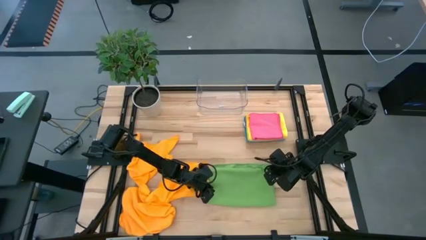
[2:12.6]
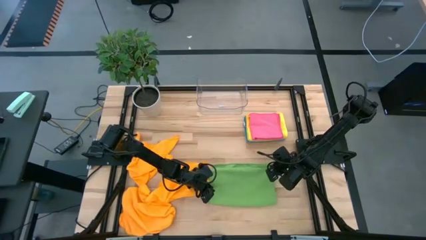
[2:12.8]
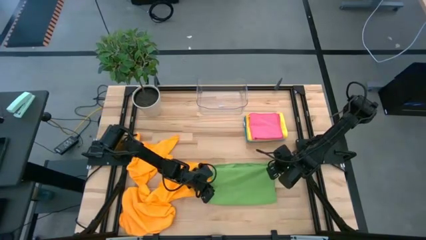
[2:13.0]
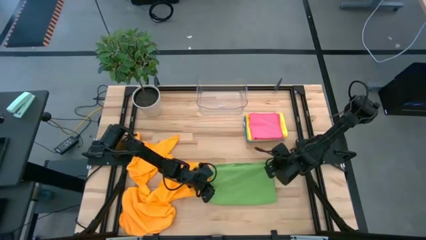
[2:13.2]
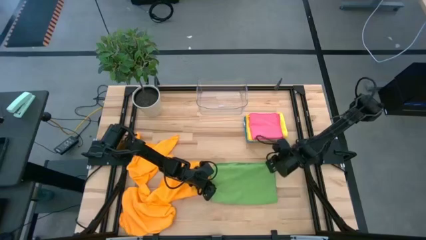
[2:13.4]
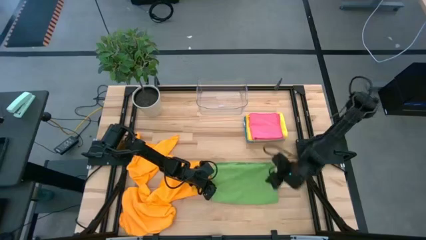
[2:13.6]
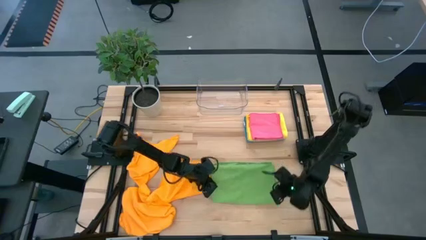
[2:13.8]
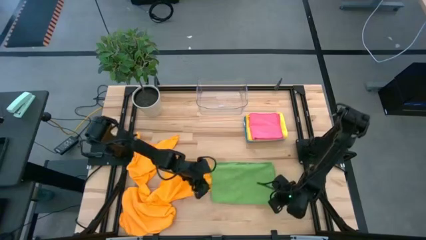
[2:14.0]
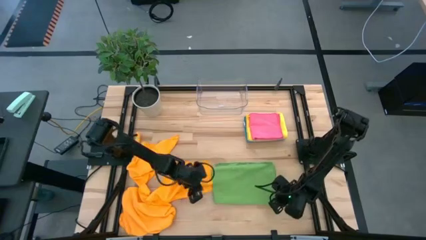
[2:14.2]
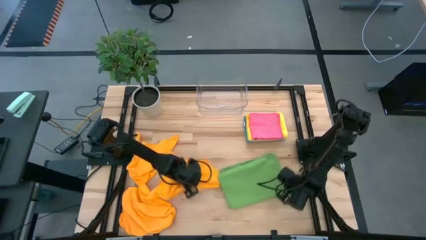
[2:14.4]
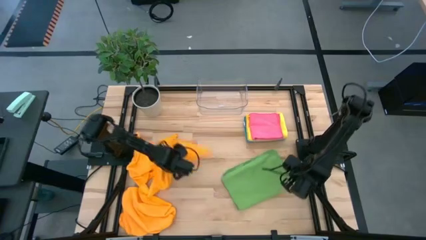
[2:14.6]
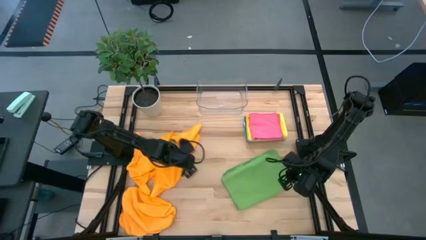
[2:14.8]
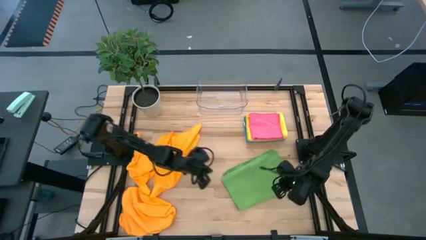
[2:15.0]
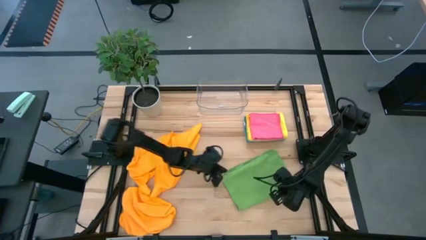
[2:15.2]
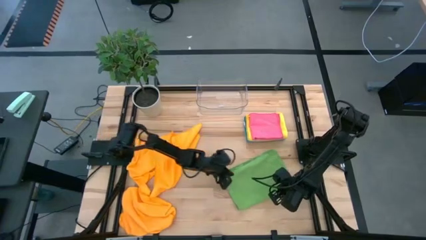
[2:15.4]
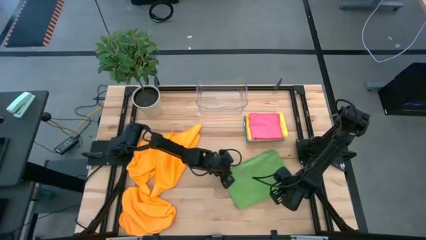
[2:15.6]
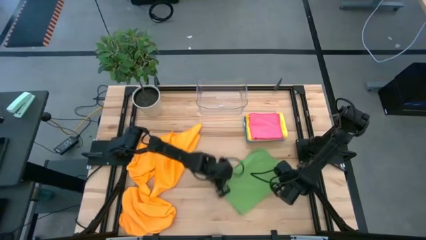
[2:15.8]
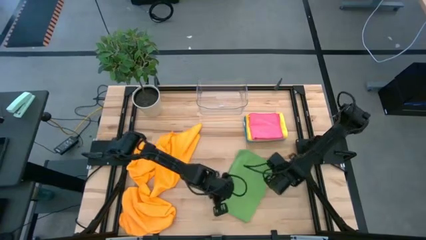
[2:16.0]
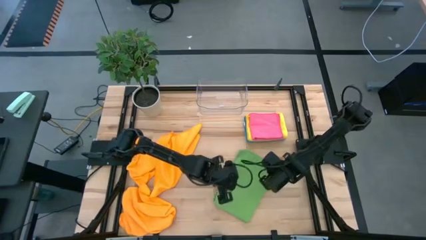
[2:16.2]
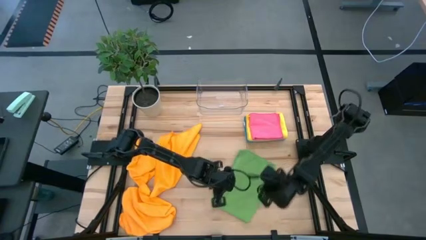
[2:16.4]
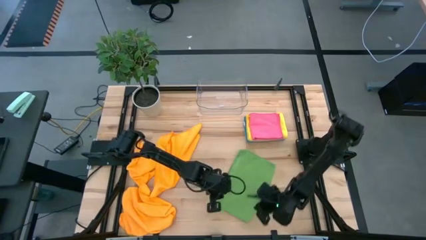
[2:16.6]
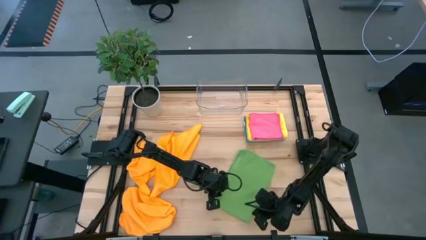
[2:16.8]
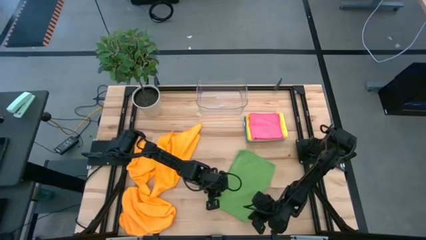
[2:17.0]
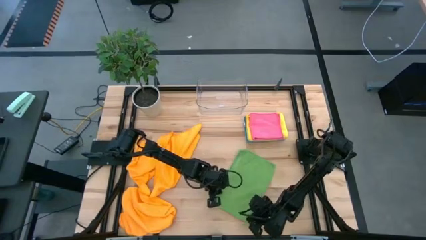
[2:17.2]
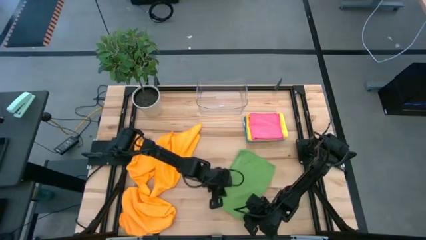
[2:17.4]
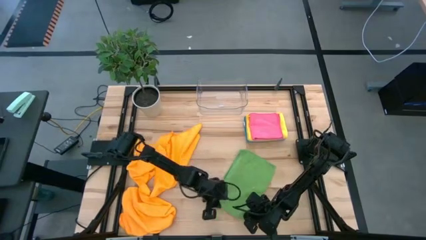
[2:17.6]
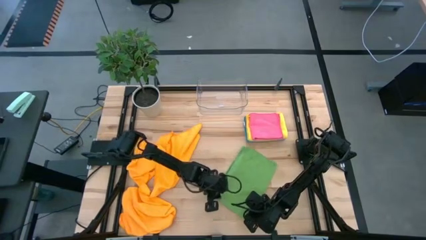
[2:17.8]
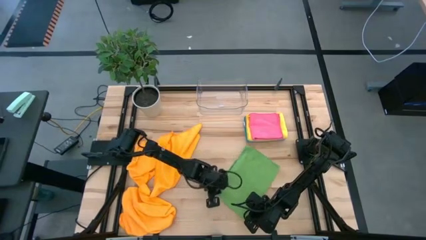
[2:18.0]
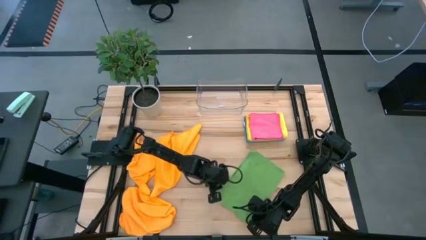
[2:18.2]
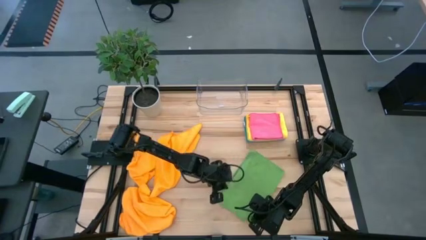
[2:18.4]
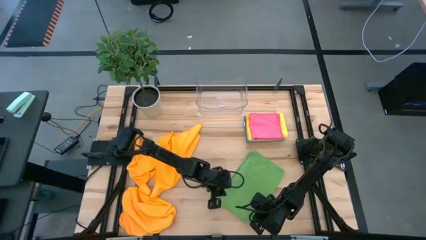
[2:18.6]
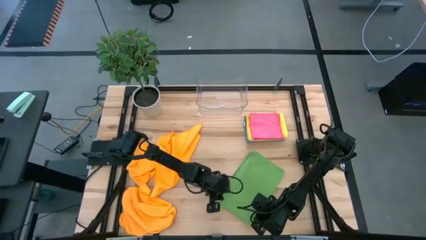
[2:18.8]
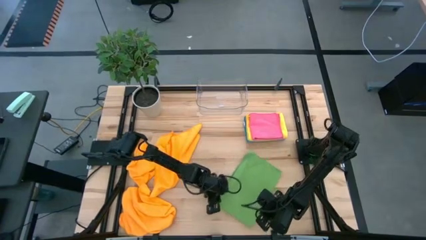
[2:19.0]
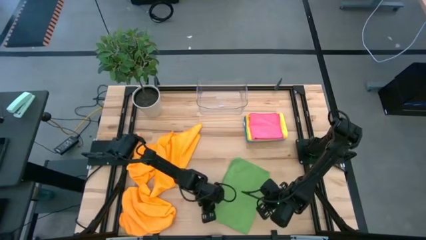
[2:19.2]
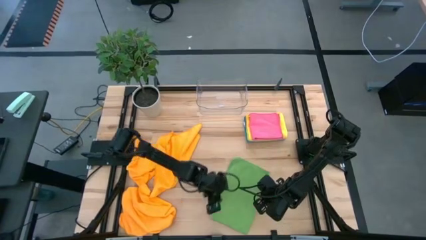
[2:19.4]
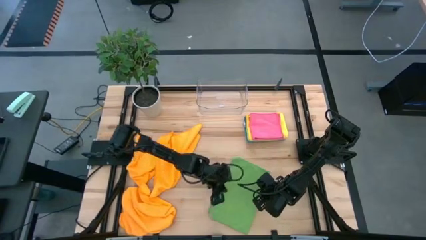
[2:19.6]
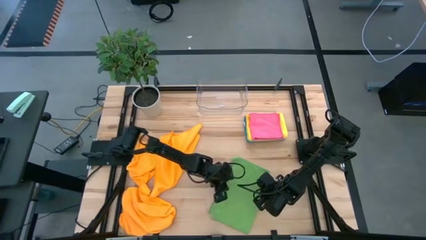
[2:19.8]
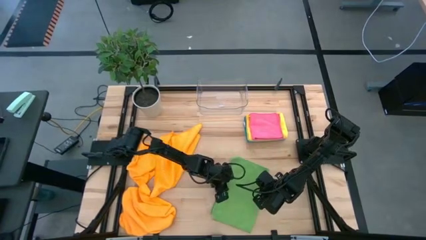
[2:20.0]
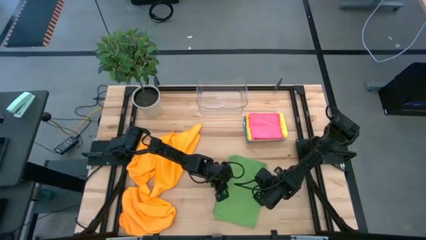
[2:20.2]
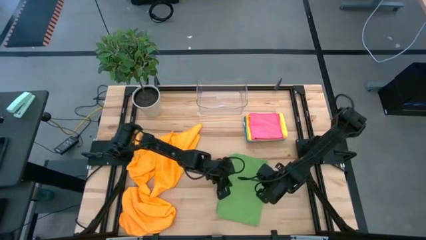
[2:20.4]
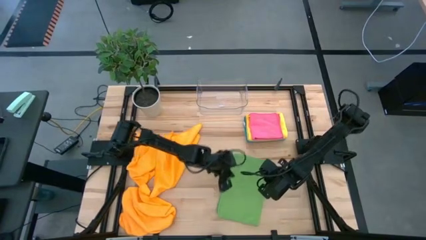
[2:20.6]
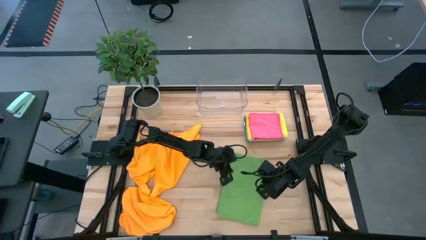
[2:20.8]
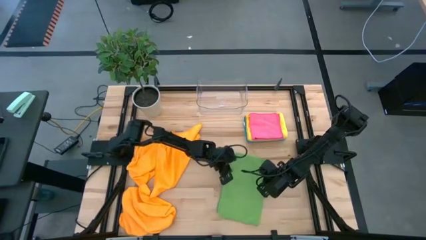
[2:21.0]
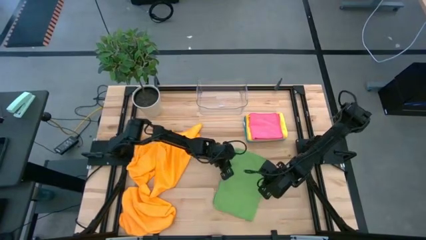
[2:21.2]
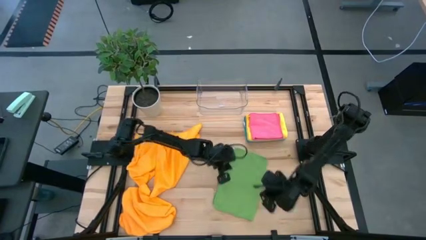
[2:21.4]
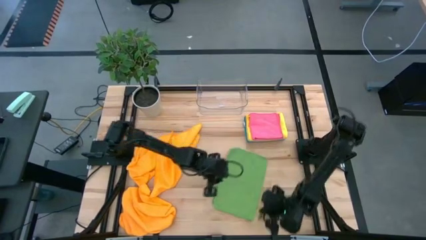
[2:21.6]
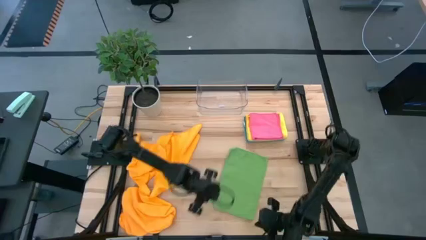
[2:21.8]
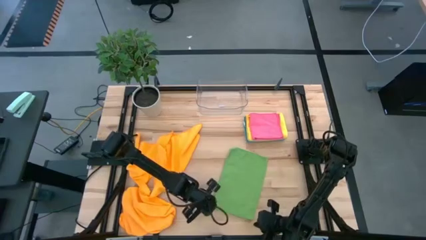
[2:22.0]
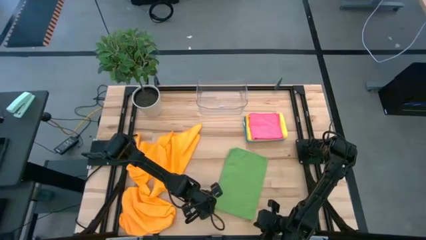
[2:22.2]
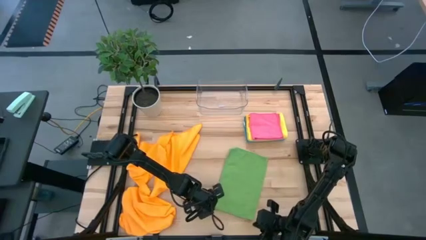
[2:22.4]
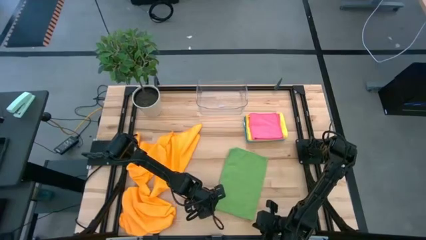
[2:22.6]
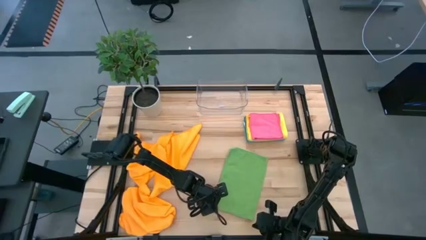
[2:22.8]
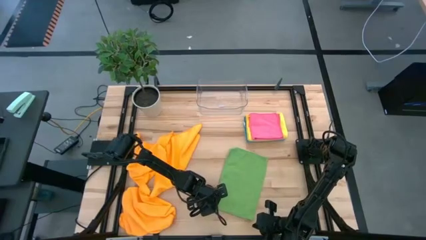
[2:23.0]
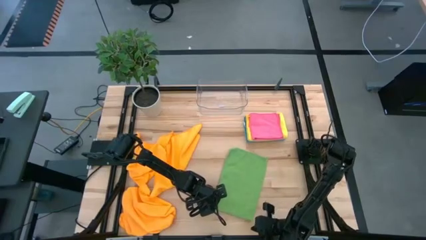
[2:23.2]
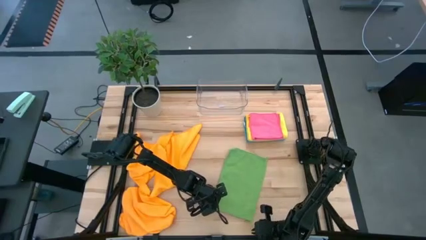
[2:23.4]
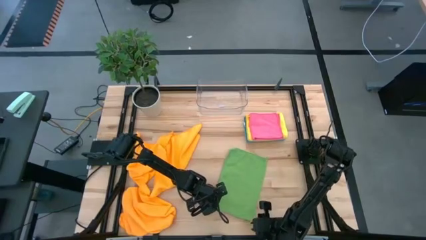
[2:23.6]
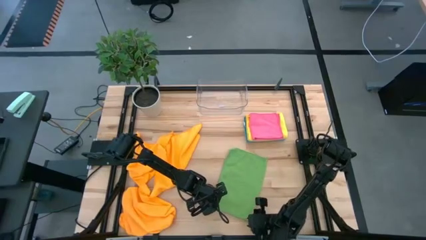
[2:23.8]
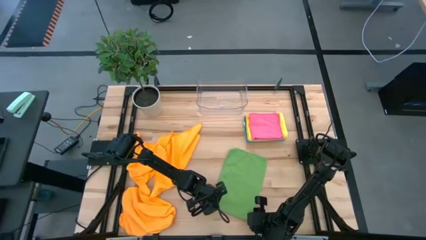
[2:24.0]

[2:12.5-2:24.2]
Task: Fold microfiber towels
Fold the green towel

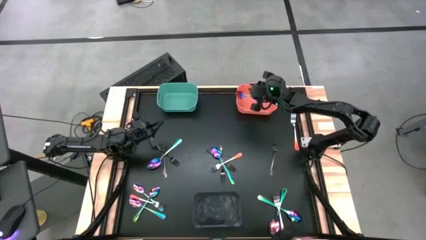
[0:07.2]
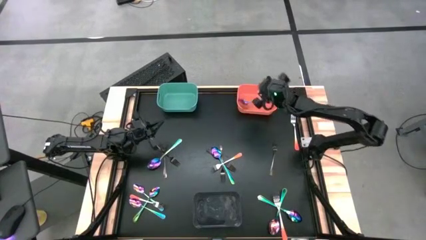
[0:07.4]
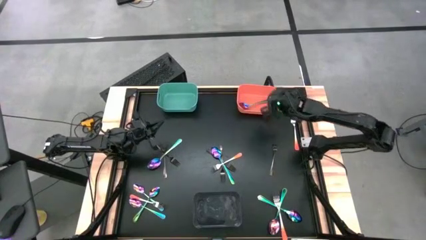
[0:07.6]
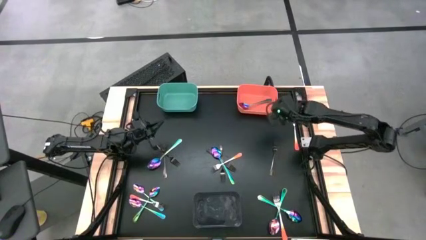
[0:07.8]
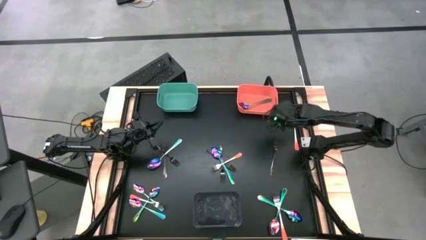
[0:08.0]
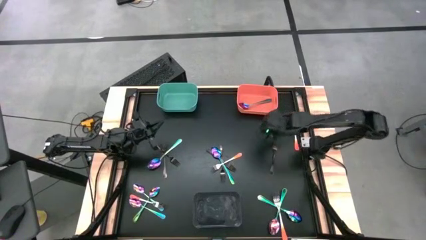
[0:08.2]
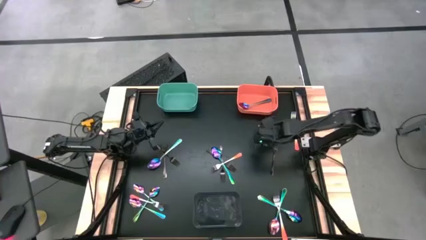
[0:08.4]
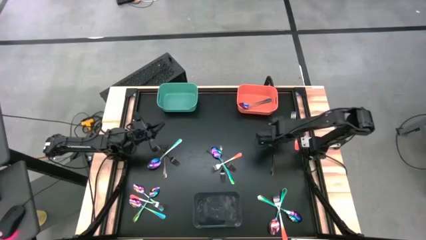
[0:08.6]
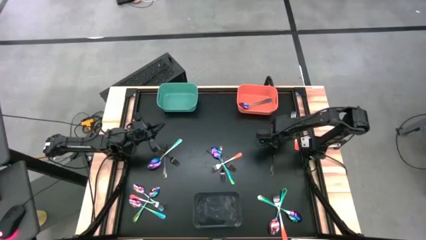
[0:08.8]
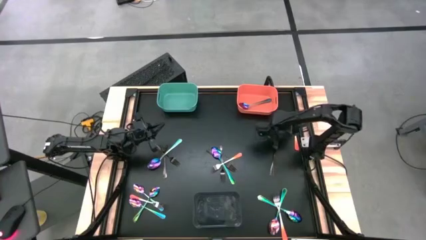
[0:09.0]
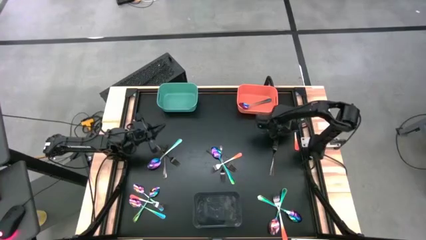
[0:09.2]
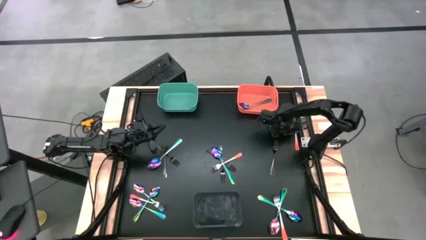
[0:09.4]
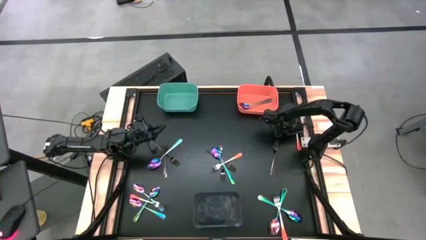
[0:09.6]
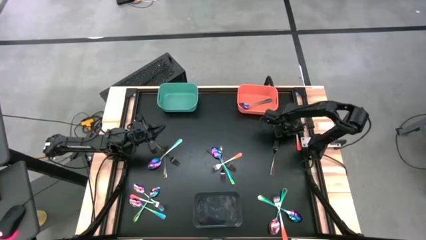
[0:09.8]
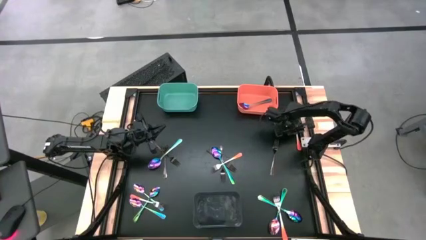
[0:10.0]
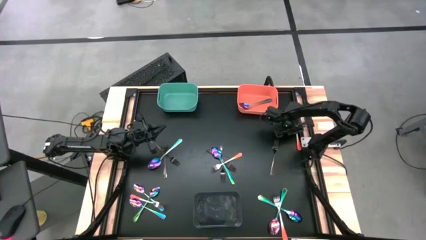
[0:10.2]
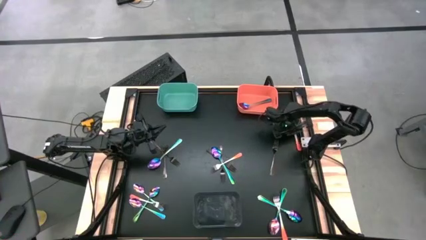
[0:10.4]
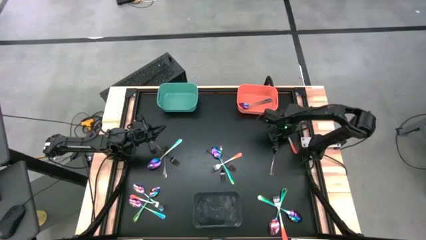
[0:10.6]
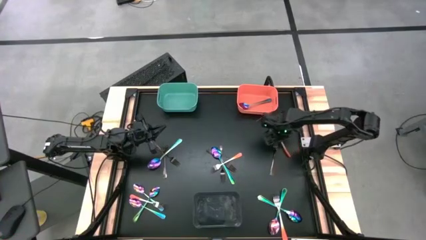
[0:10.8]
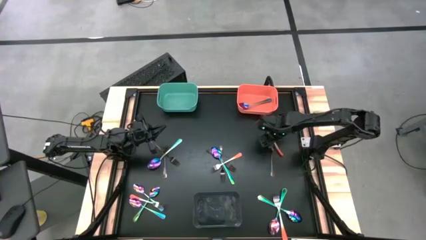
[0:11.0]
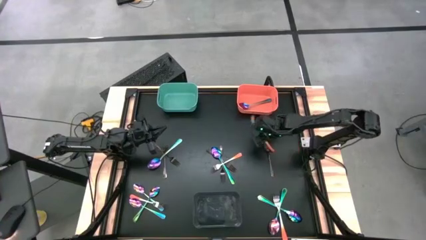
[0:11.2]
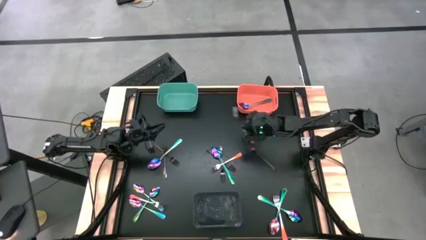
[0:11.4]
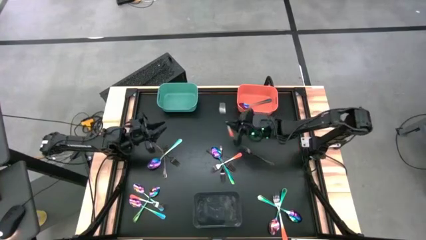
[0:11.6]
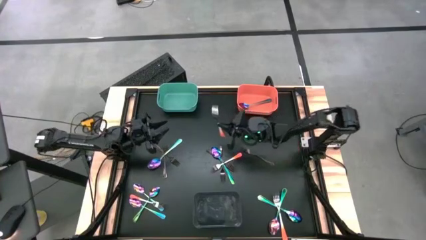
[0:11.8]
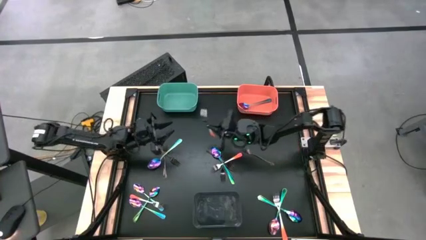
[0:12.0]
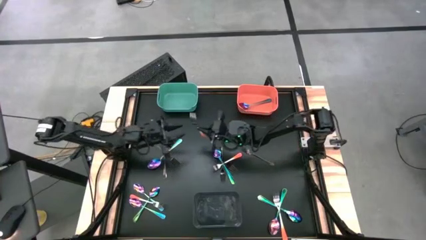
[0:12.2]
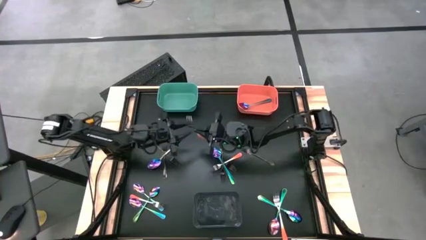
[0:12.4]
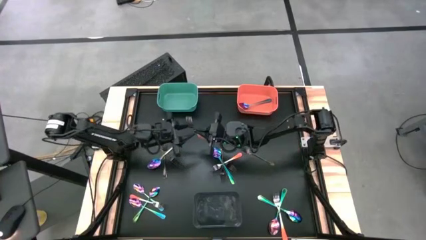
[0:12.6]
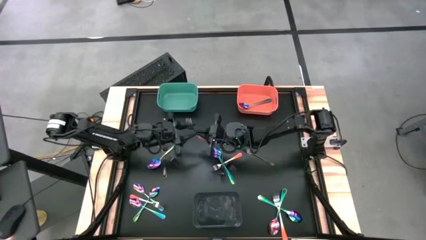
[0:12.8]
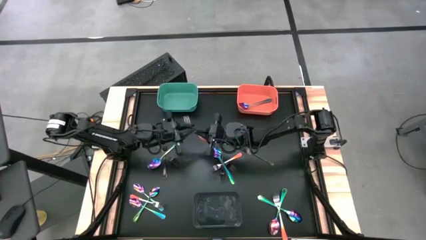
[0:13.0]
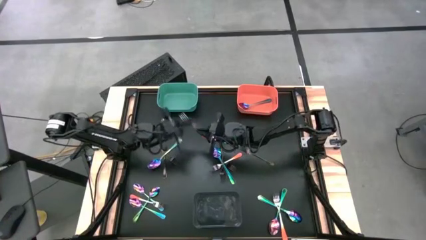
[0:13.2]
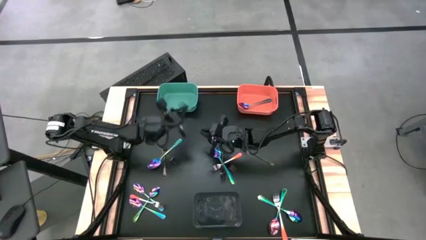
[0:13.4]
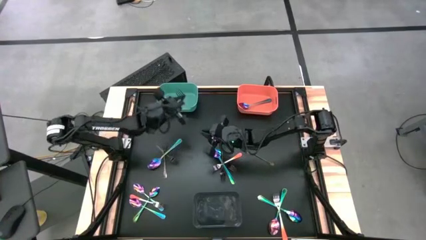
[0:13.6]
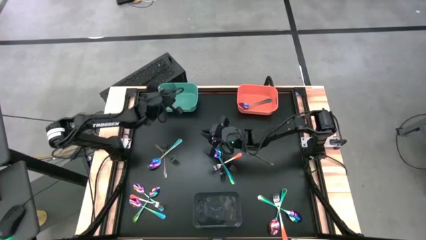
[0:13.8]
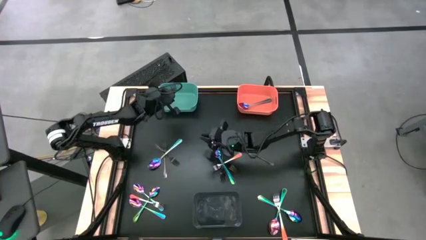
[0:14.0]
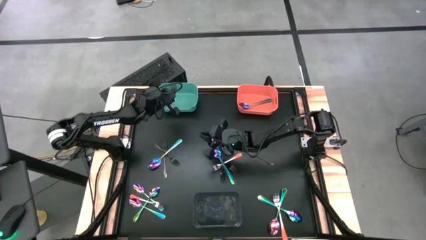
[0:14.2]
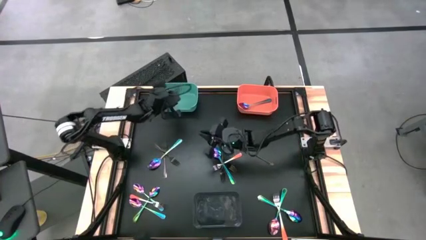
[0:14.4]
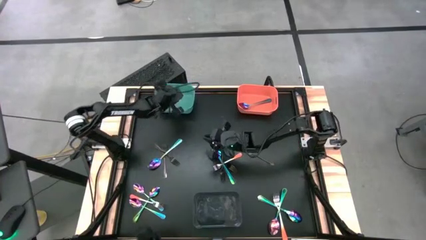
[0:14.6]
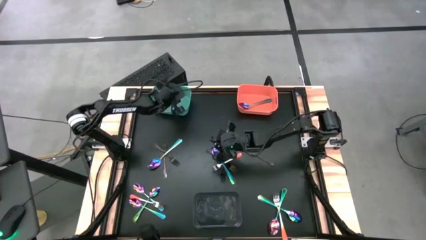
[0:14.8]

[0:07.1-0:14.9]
Task: Sort silverware by color (type)
Put the orange fork into the green bin
